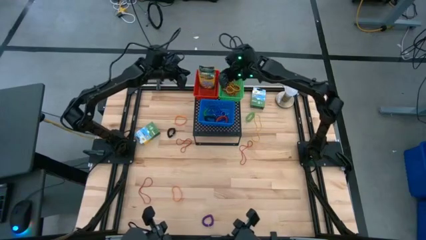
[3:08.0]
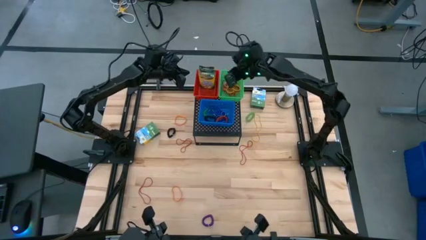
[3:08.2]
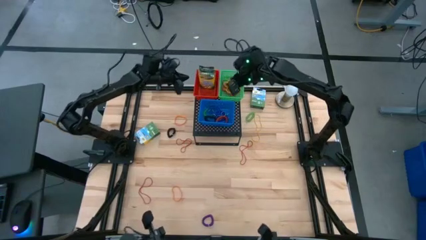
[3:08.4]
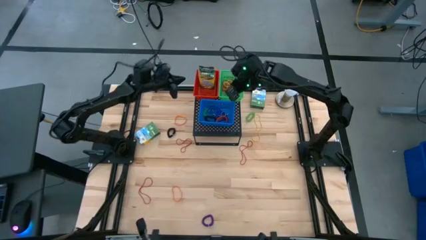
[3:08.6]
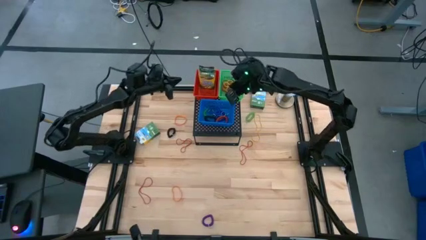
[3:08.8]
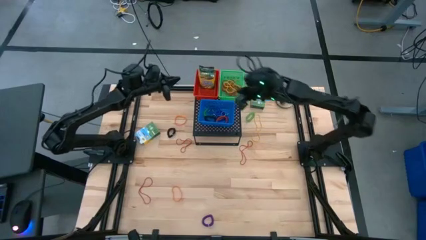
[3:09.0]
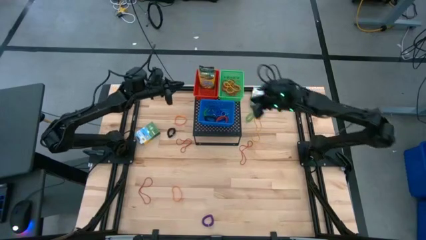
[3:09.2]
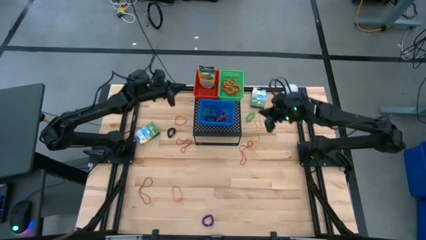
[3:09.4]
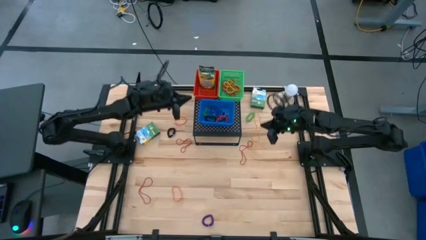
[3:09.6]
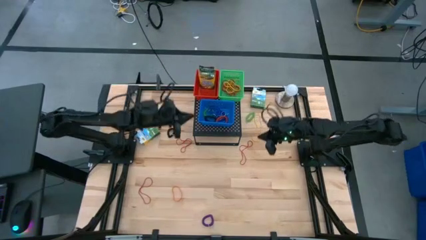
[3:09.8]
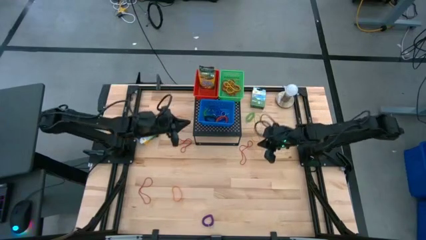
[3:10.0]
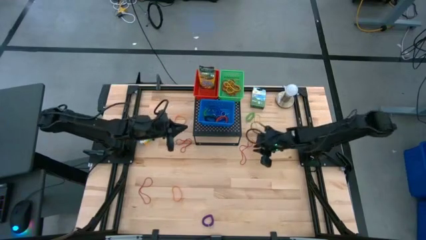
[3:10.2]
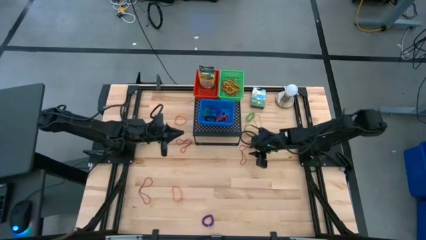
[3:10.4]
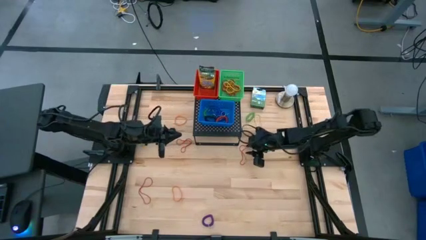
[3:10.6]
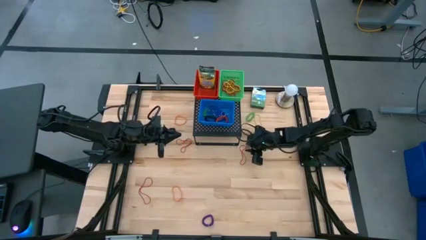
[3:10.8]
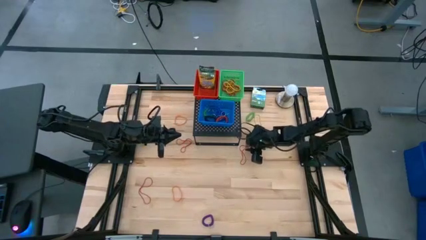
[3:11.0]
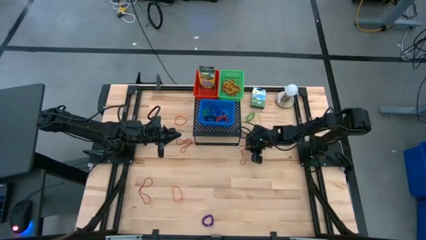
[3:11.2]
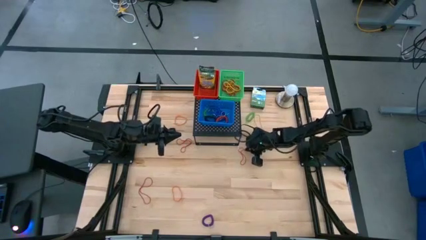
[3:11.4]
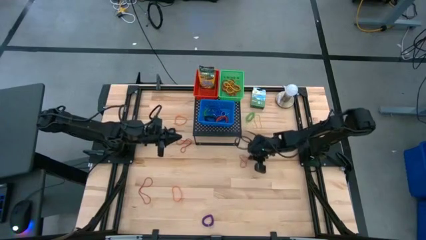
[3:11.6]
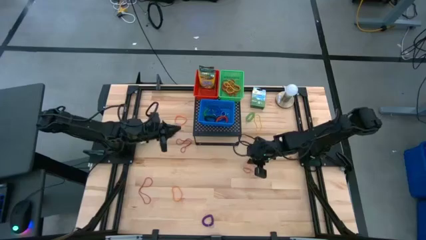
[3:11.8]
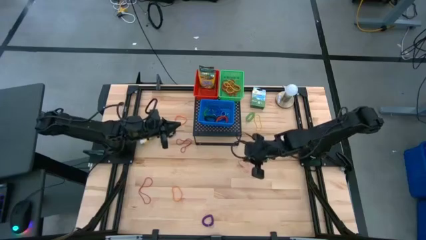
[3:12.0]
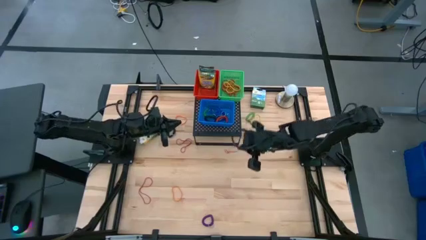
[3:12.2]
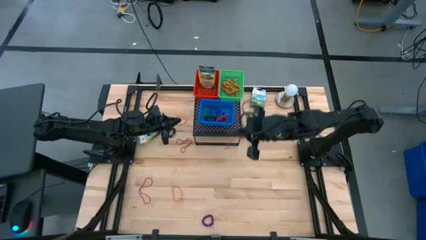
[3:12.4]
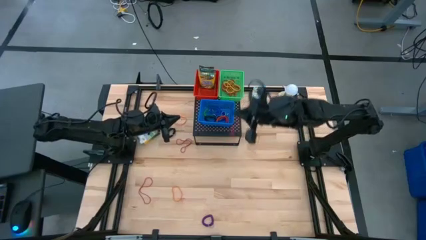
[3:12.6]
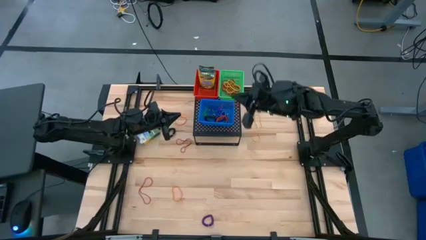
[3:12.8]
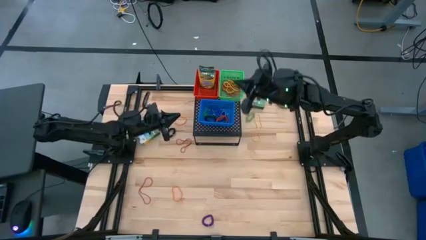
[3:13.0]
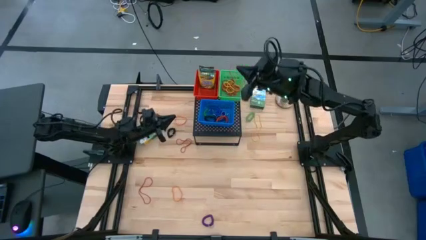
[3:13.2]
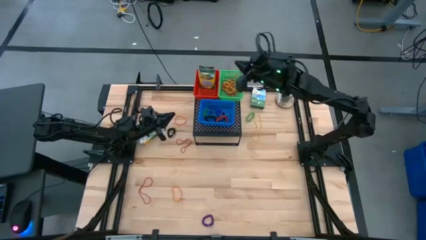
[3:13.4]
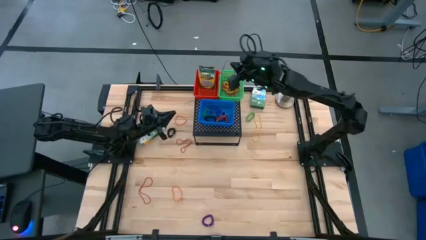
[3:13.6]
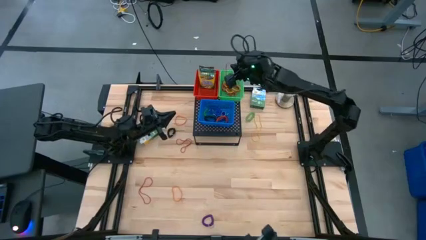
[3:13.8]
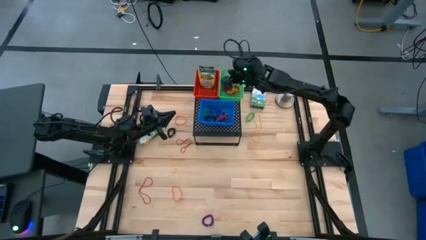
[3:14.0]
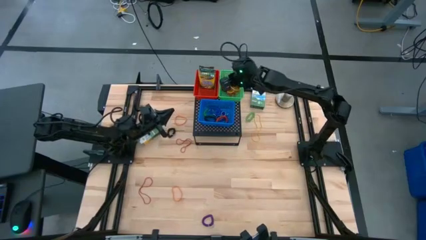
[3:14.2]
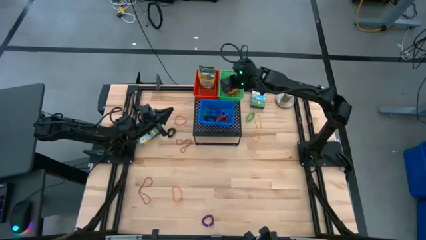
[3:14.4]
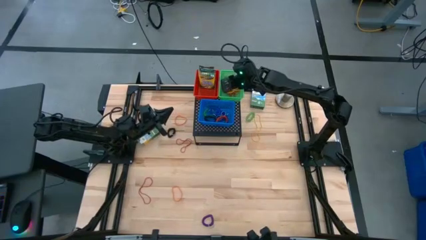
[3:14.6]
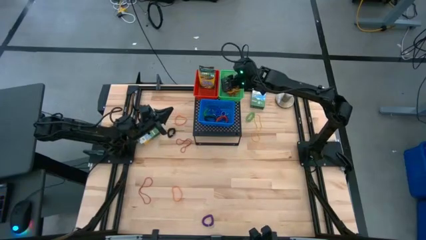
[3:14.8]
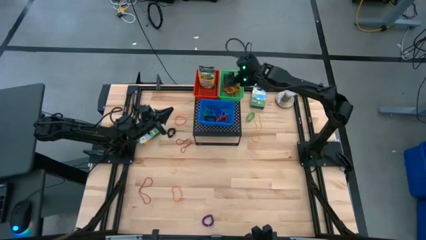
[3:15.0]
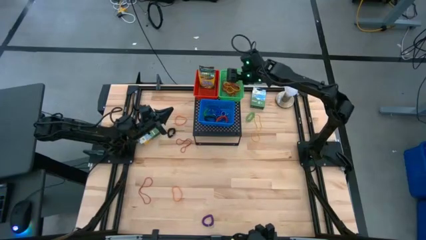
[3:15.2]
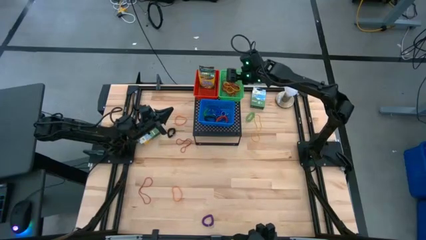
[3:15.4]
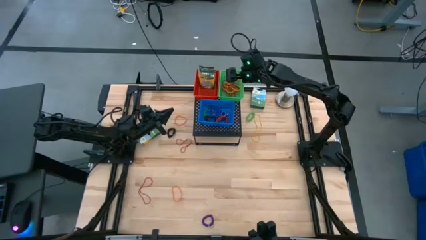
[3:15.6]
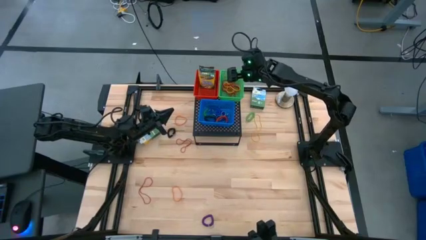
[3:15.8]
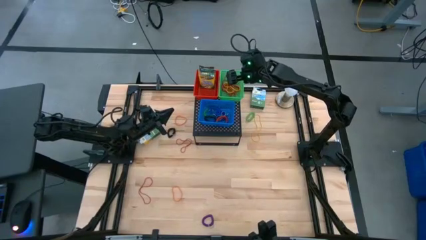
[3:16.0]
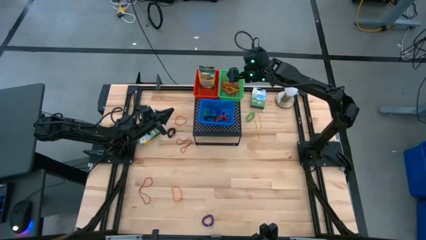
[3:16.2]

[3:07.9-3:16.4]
Task: Pick & Place Office Desk Supplies
Put the red rubber band into the green bin on the shelf

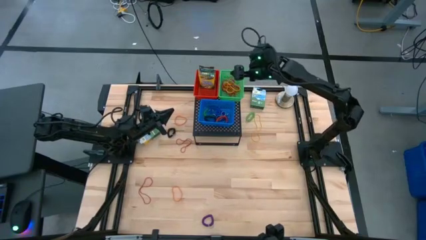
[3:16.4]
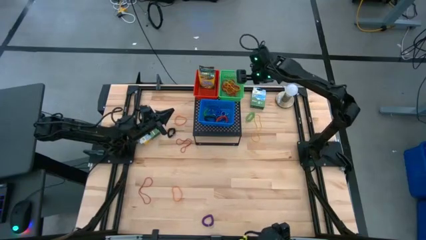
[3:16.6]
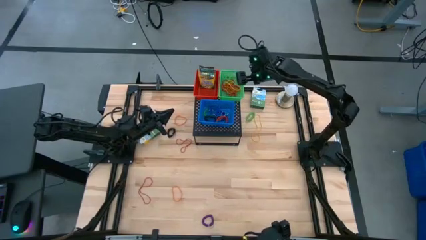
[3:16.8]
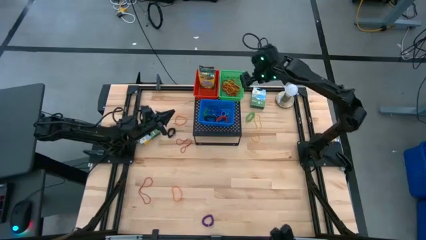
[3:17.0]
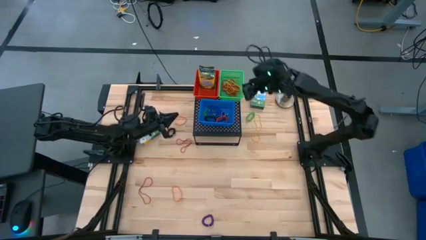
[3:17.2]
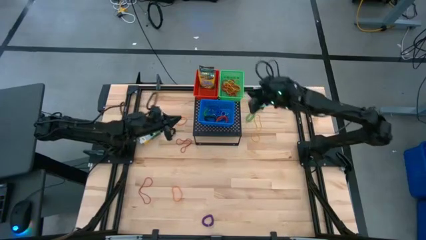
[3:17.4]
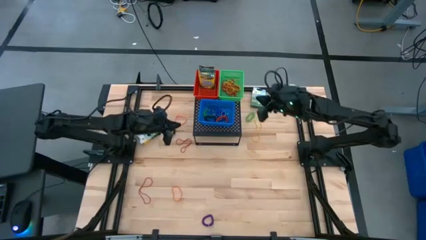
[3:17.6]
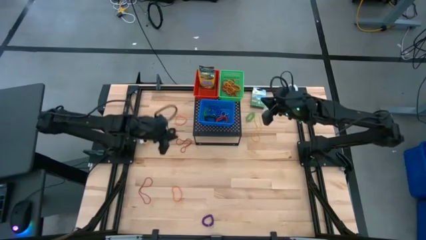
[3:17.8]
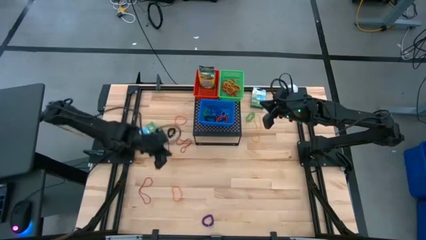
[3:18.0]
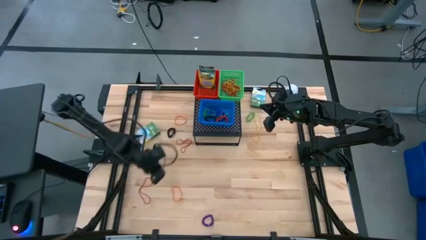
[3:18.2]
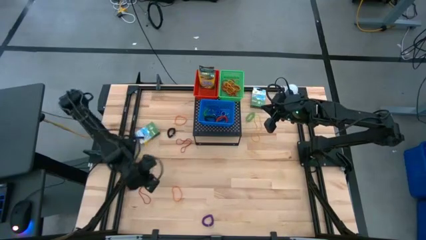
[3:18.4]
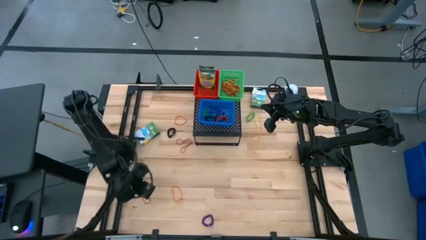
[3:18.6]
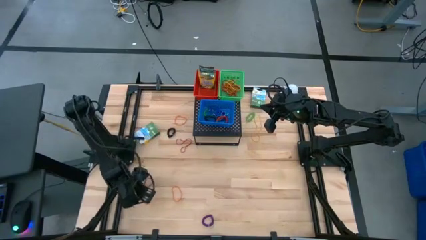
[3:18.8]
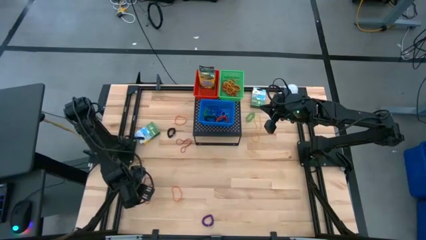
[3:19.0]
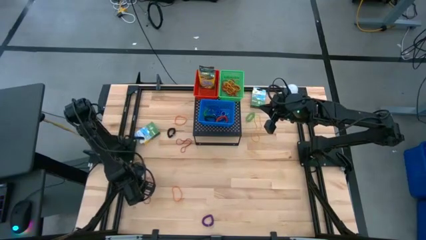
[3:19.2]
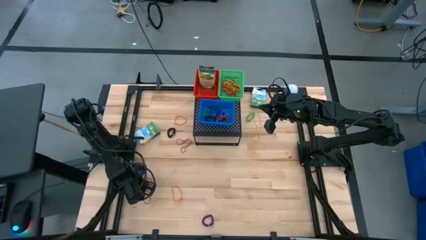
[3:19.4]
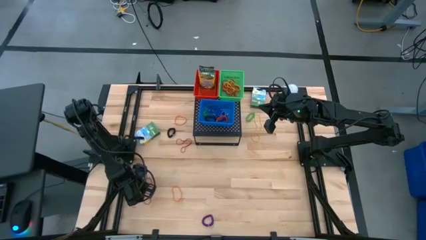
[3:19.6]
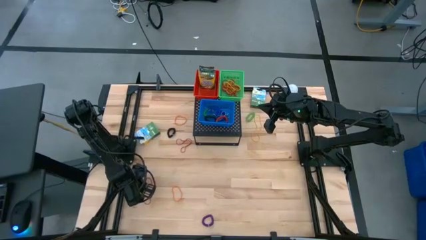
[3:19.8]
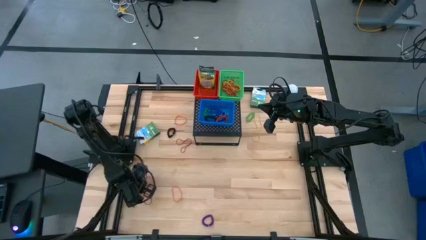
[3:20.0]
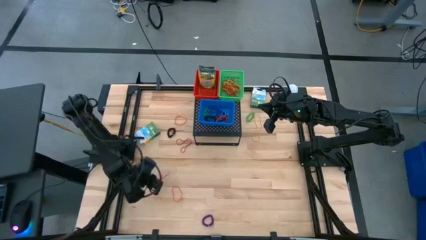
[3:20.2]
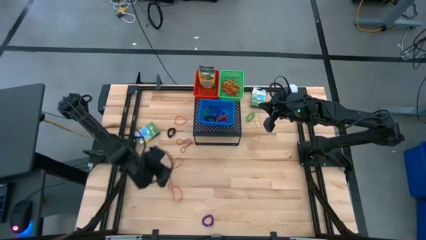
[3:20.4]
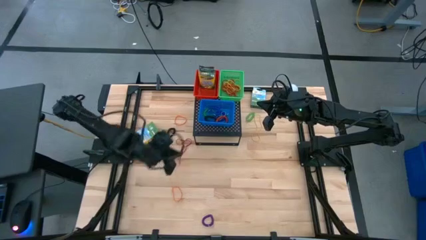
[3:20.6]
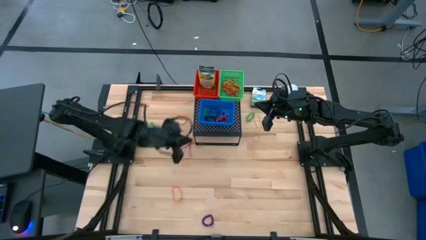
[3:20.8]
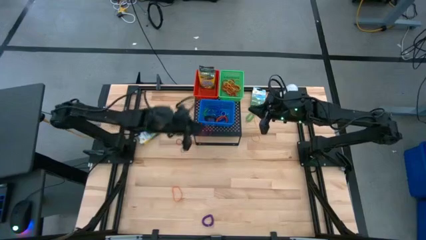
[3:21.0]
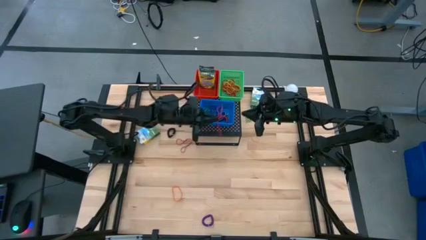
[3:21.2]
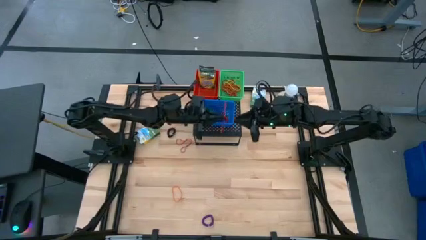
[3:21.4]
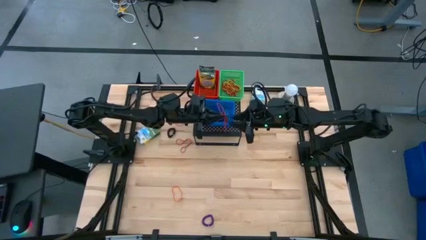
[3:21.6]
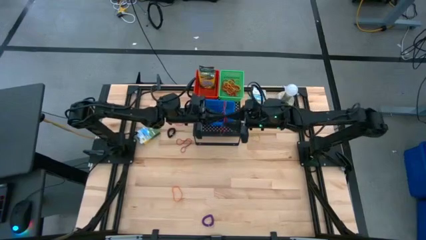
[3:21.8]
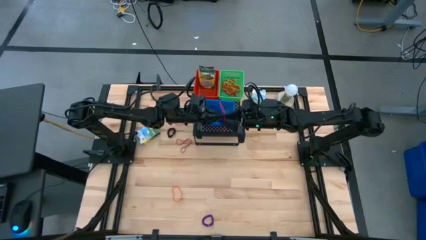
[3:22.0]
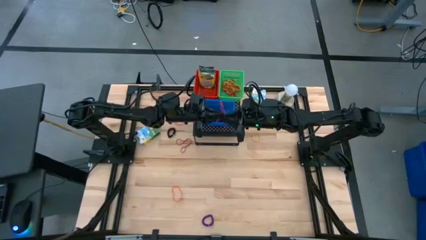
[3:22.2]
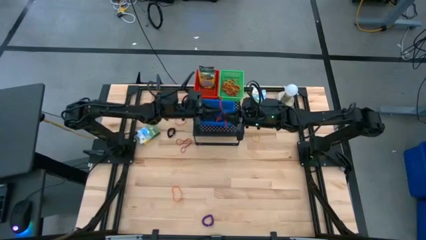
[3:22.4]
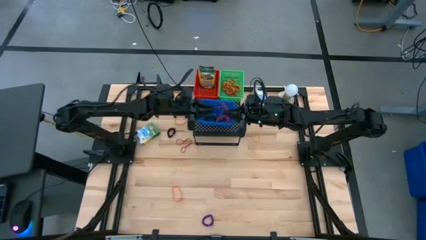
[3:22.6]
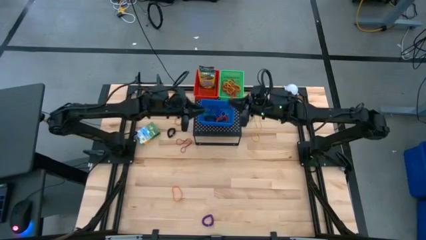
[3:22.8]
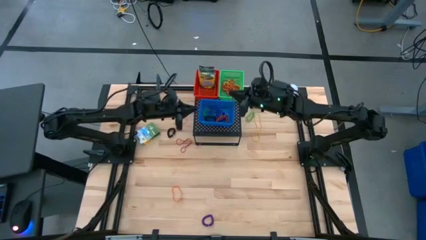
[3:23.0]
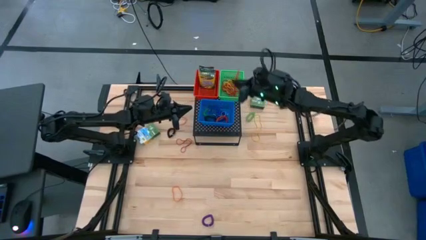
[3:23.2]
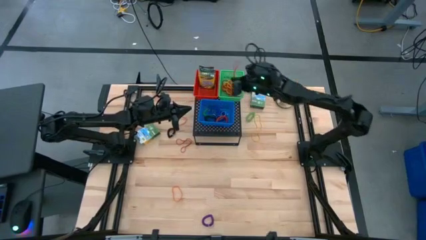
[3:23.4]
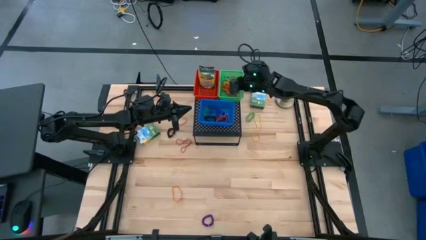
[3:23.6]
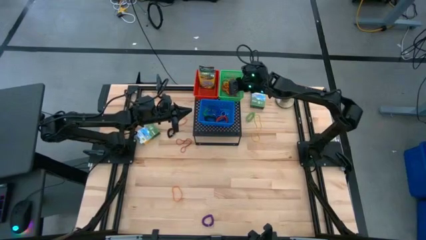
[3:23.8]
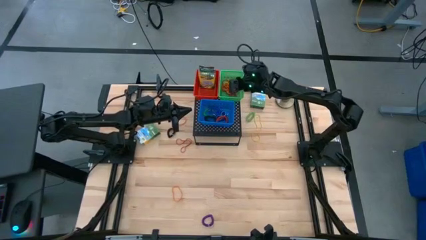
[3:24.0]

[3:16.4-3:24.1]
Put the red rubber band into the green bin on the shelf
